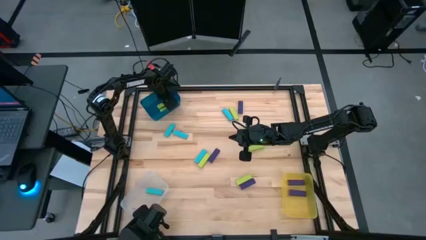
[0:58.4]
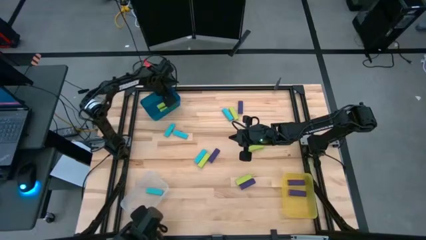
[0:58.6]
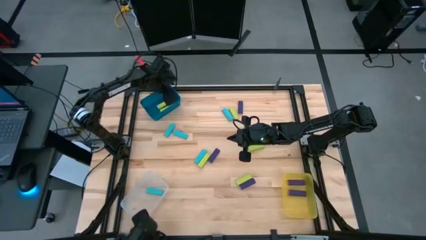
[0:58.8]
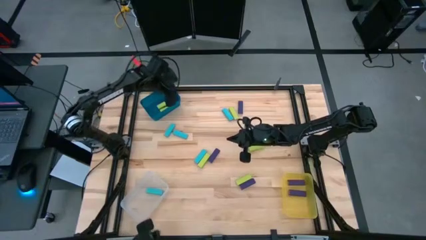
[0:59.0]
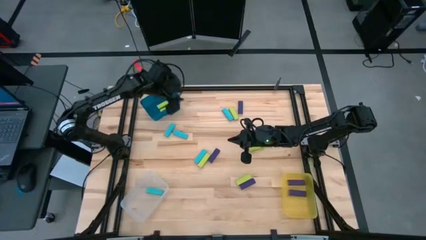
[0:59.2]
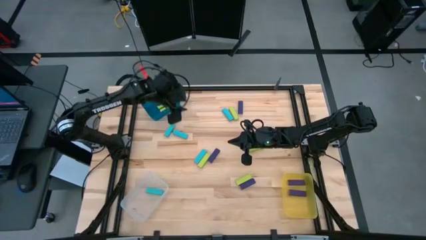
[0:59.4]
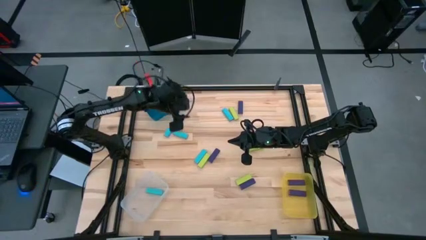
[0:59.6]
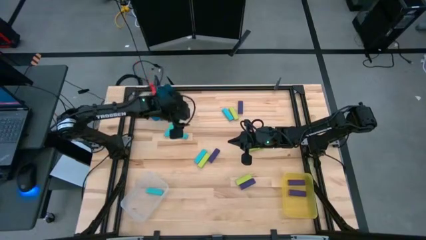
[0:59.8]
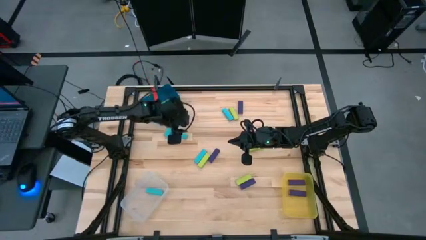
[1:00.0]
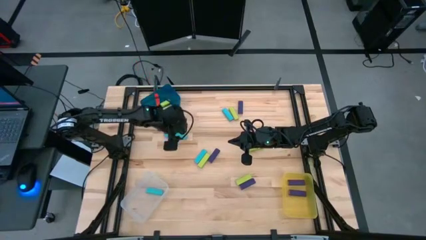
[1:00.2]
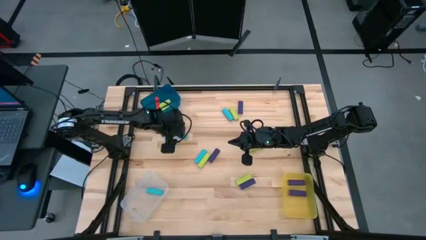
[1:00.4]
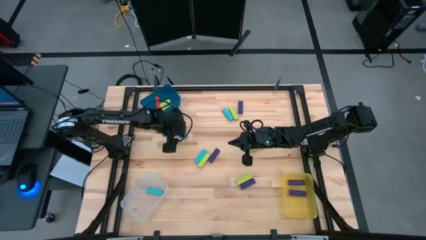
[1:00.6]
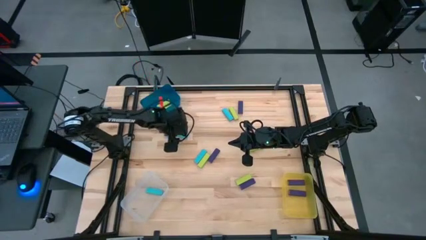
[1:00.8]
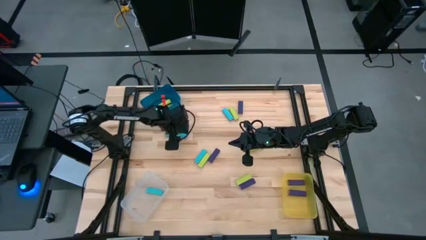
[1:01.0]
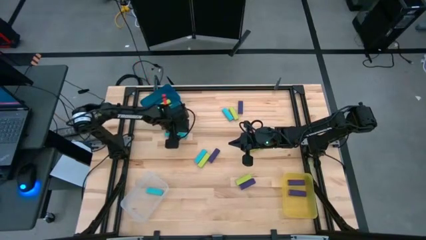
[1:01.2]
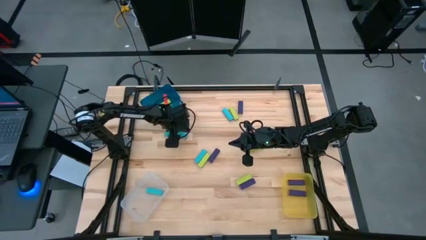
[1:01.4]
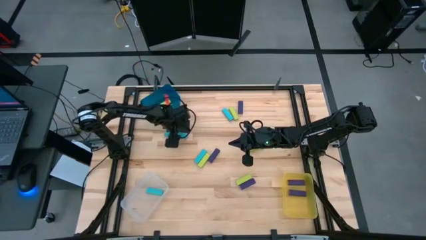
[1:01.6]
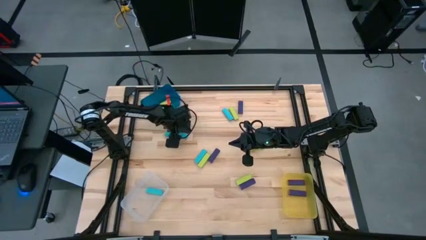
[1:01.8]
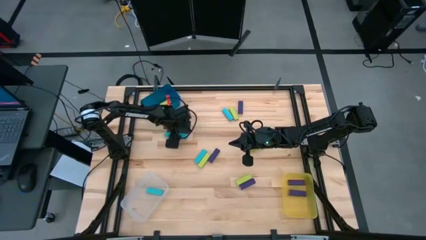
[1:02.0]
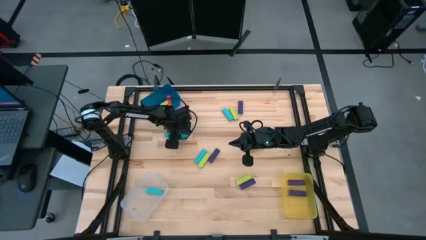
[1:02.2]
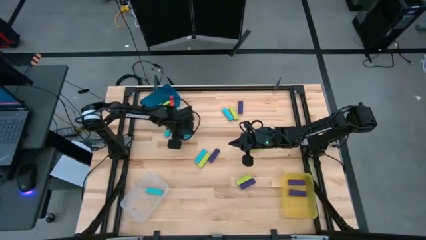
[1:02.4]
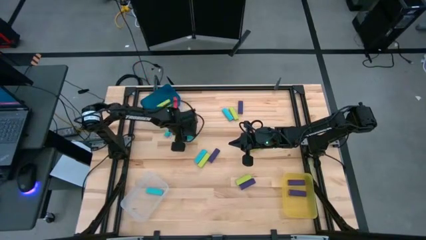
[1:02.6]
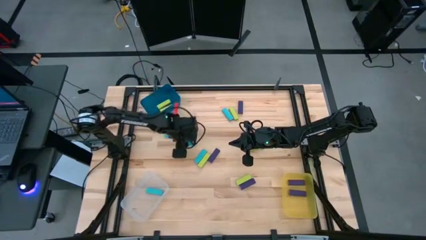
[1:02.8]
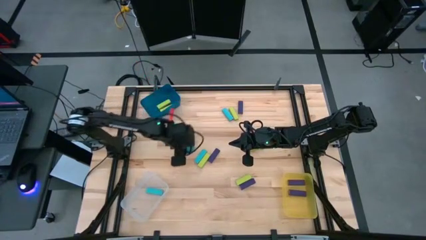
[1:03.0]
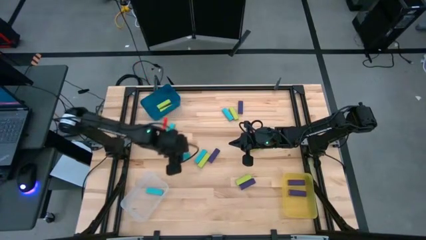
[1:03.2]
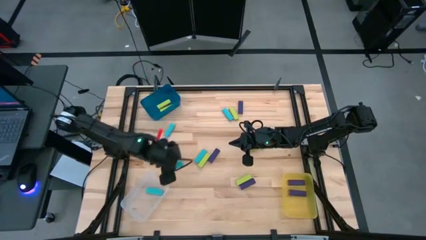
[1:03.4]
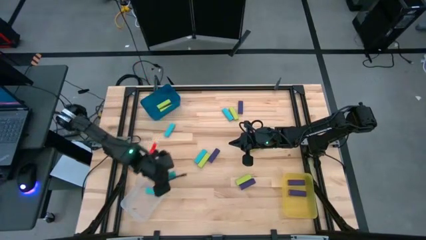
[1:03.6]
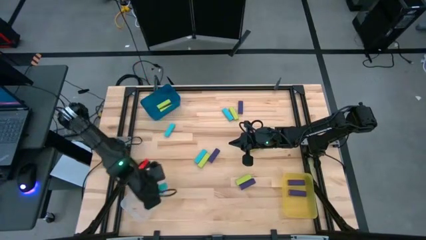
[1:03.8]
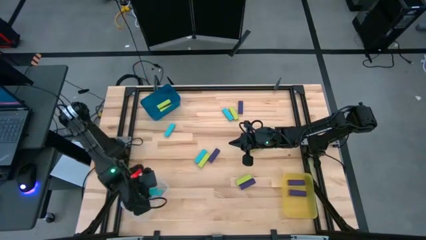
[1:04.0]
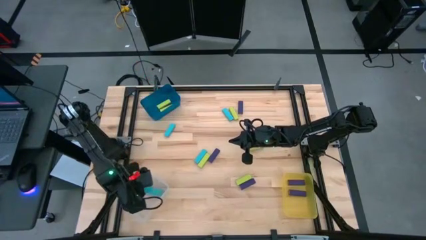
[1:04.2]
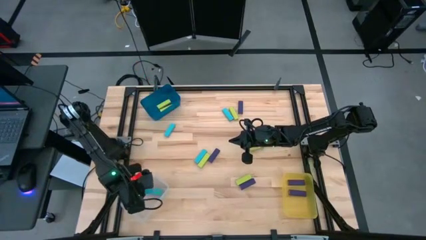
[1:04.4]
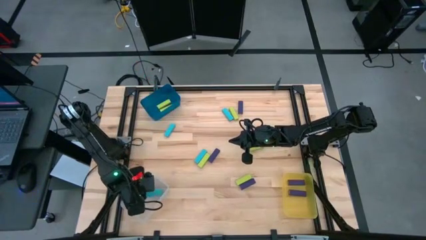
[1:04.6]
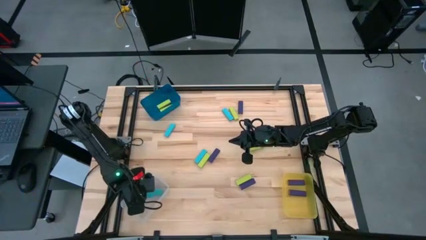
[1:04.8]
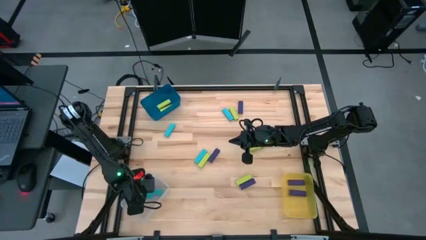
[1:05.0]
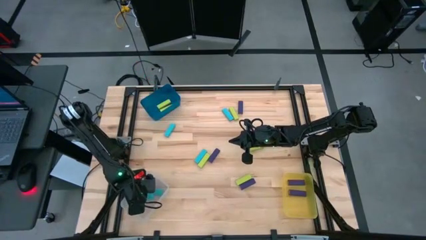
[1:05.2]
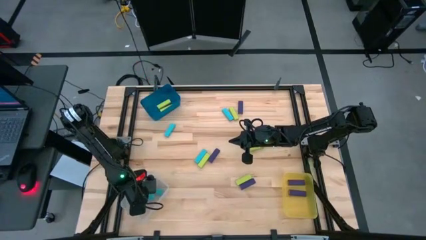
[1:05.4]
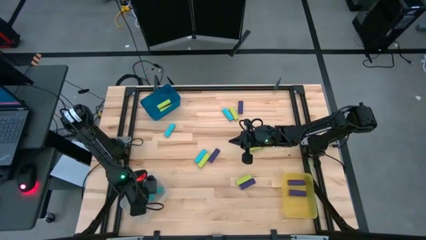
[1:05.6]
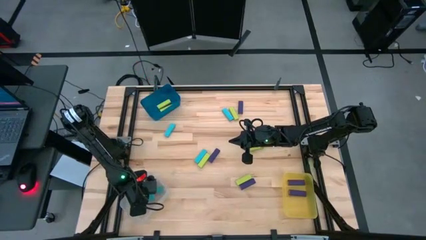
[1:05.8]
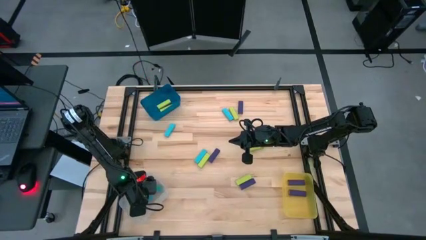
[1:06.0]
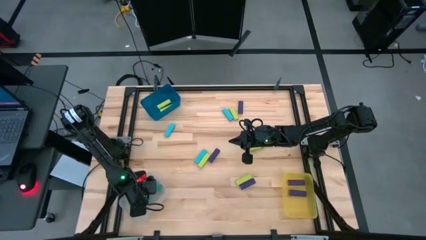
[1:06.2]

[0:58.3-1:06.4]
Task: Sort blocks
Put the blue block into the transparent bin

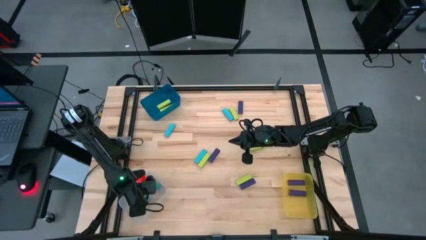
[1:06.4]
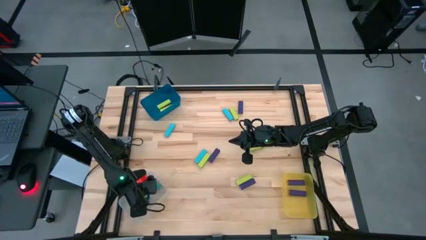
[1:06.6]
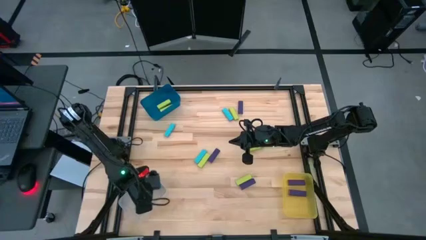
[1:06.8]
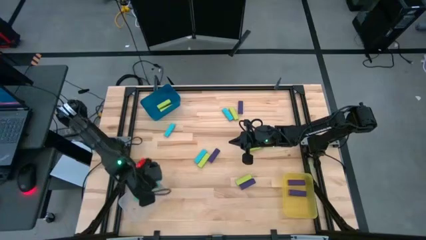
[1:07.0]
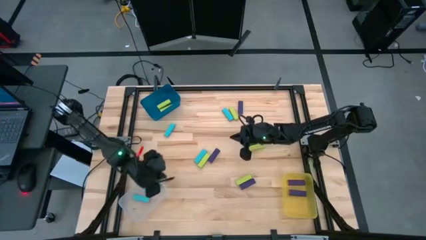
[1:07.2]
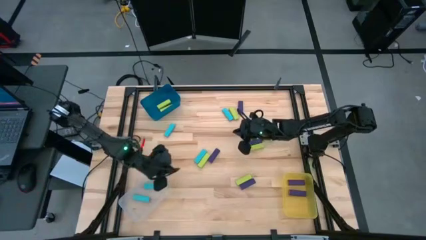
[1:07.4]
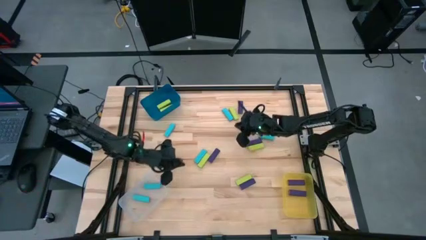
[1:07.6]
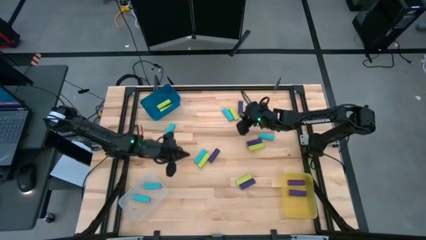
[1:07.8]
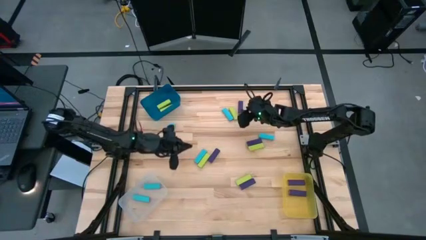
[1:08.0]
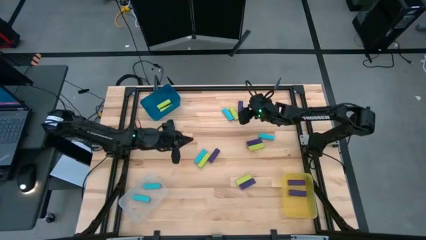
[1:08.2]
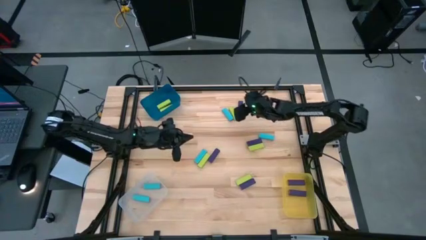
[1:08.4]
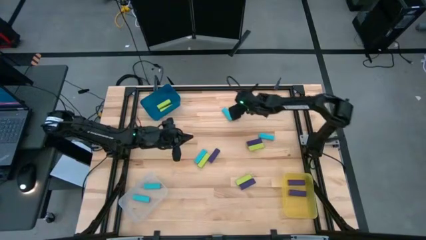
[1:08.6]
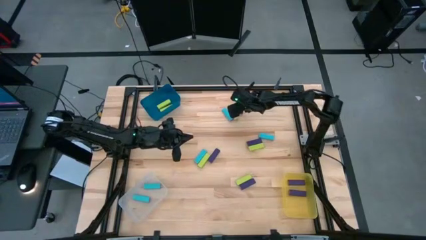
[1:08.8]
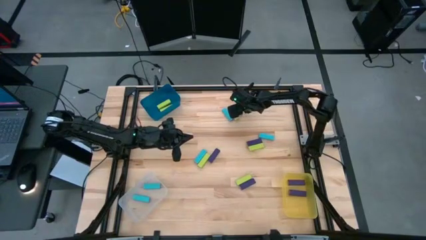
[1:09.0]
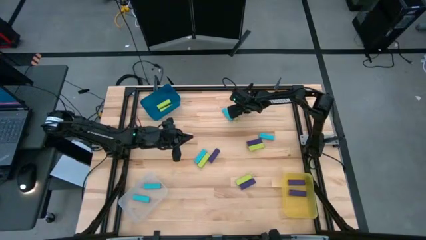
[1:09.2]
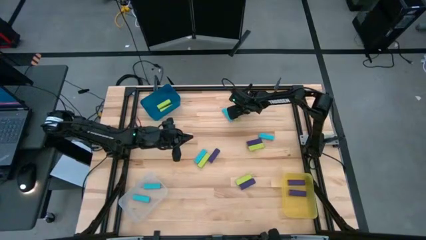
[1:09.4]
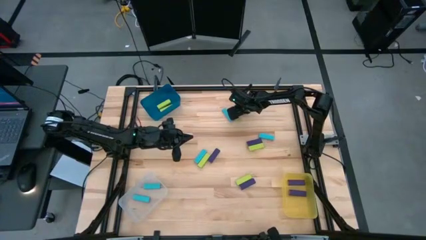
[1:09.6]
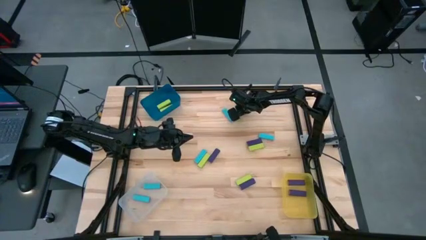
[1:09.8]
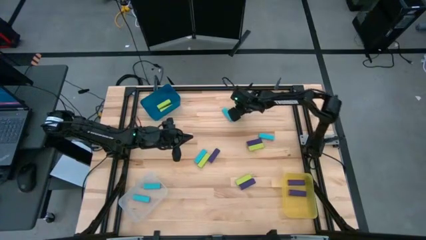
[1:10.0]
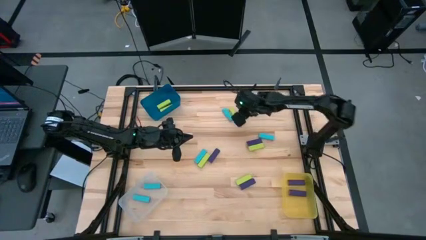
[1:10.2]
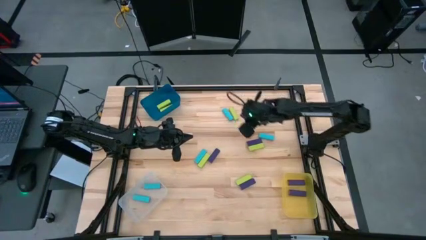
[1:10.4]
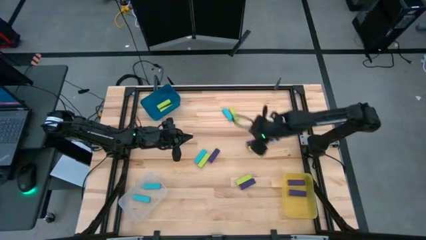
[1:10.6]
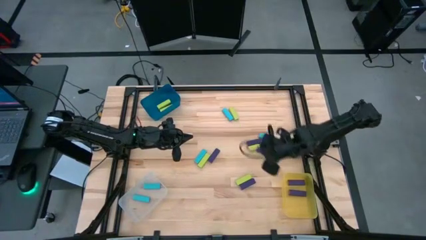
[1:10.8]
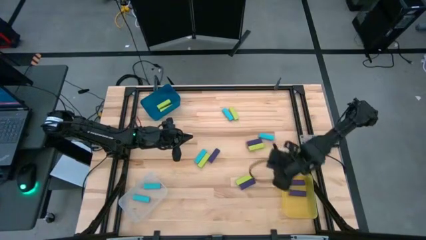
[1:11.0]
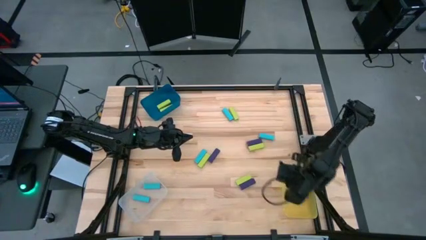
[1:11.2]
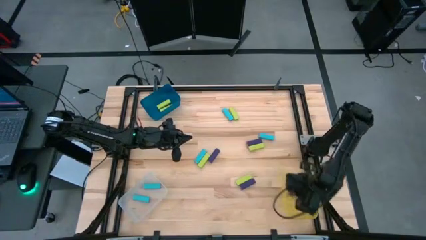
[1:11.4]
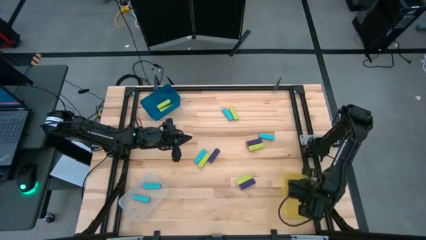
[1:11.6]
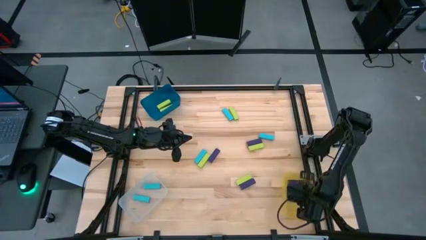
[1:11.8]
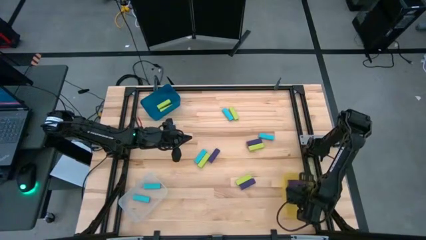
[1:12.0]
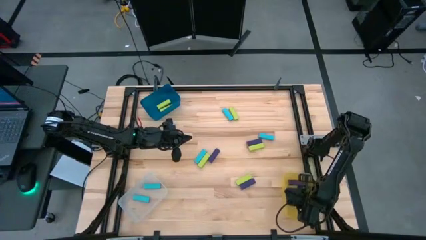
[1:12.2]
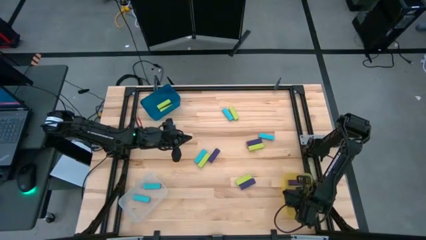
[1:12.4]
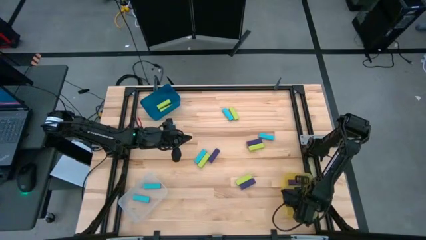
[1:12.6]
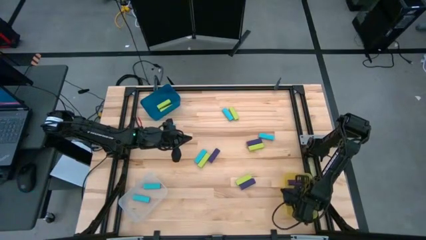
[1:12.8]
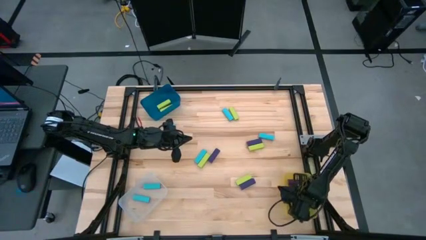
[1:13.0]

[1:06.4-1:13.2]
Put the violet block into the yellow bin

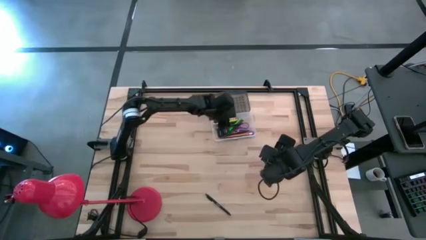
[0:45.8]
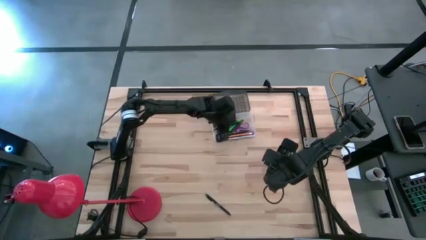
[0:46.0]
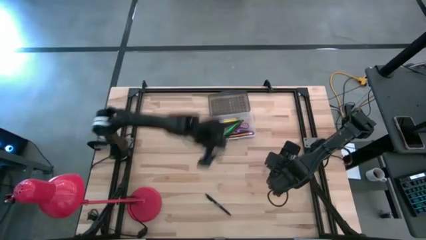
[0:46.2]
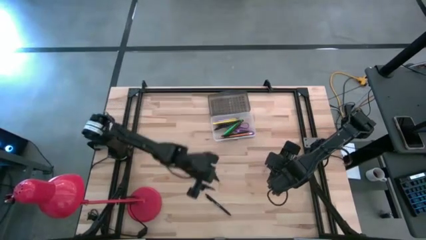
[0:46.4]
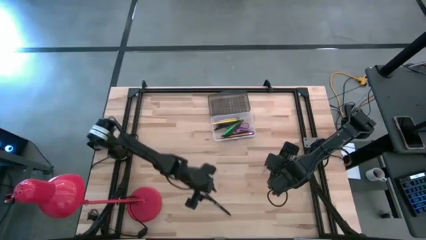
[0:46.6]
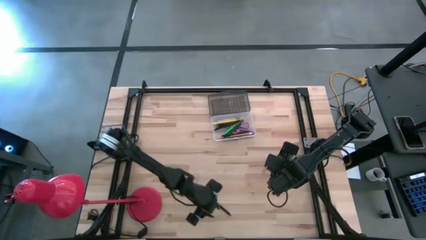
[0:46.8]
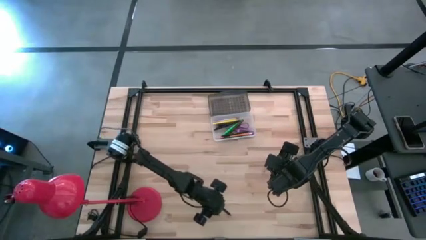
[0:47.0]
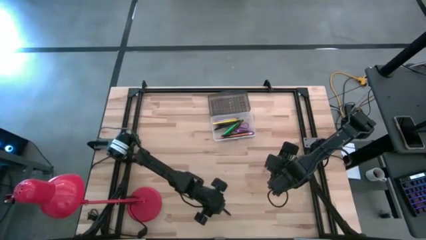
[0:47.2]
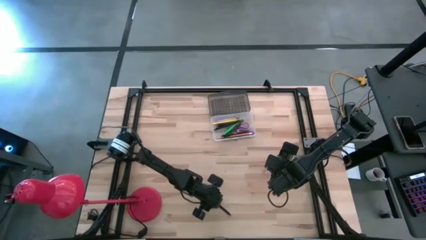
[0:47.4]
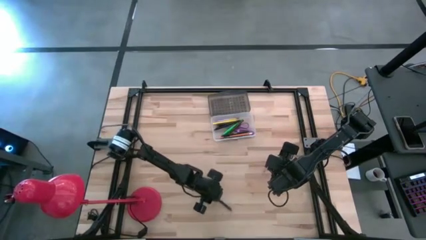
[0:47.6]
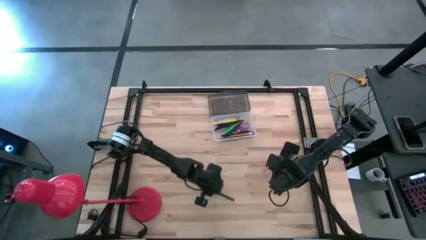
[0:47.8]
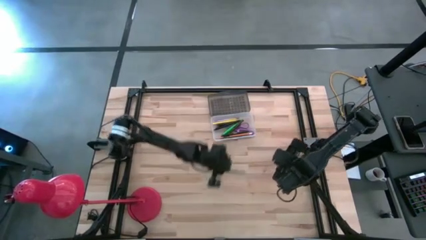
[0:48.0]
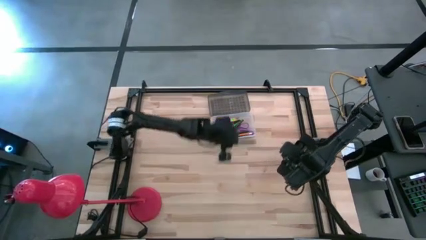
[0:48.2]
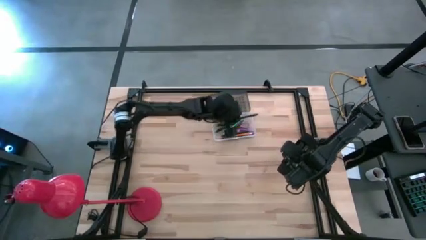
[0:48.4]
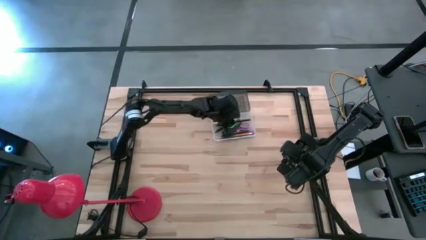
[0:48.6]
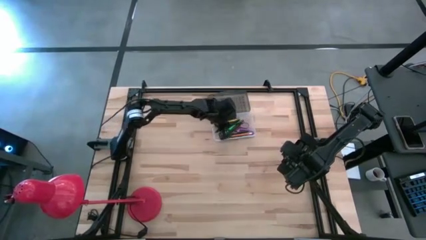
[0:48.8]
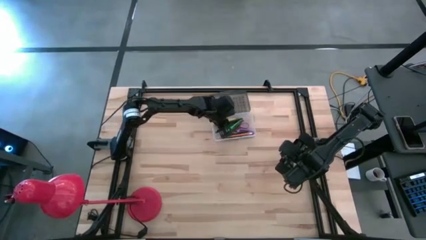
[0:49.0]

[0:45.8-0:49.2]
Task: Pick & place school supplies into a supply box
Put the black ballpen into the gray supply box
